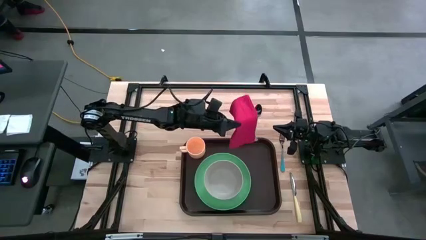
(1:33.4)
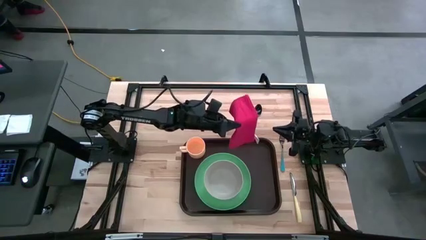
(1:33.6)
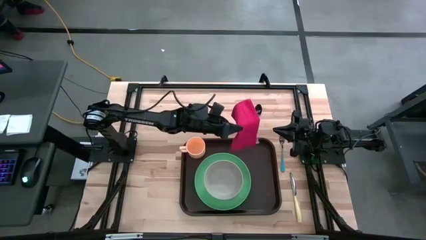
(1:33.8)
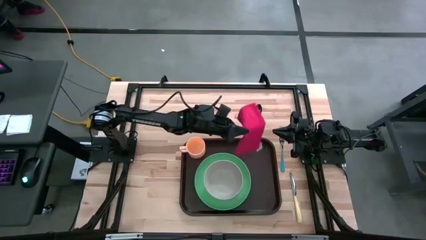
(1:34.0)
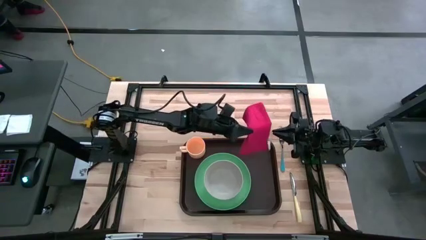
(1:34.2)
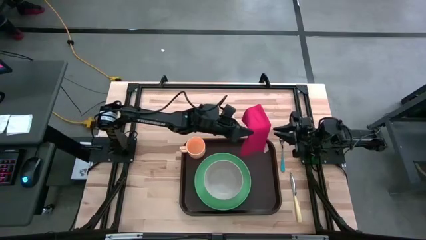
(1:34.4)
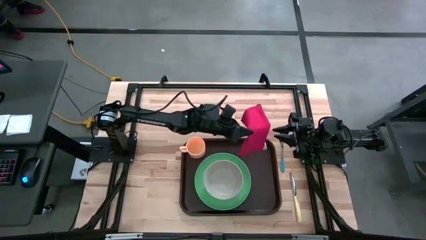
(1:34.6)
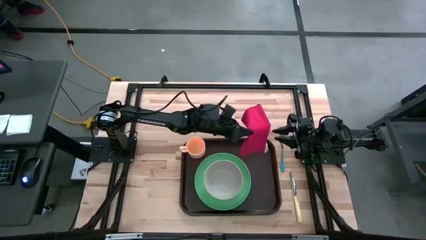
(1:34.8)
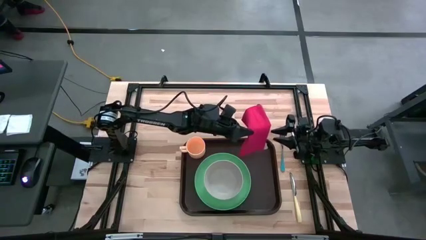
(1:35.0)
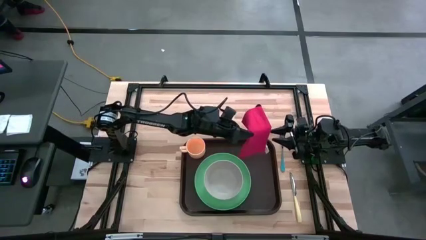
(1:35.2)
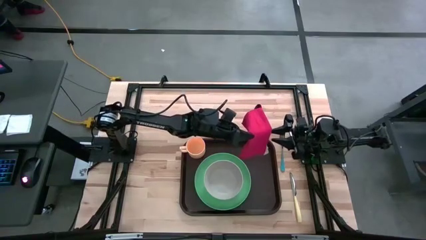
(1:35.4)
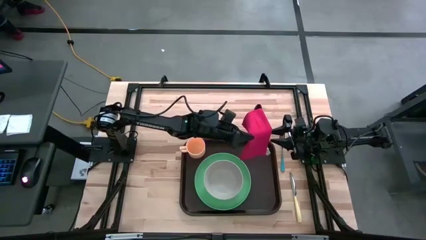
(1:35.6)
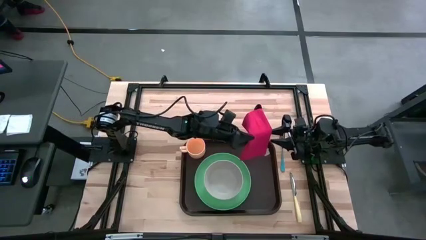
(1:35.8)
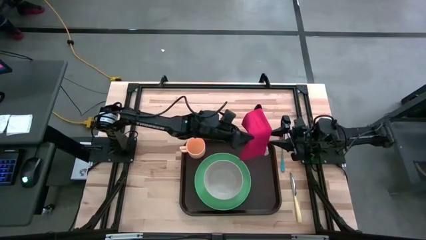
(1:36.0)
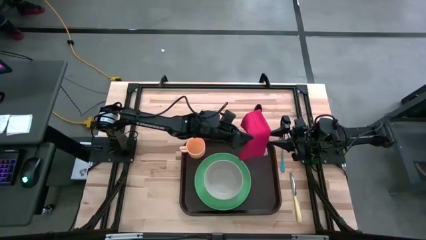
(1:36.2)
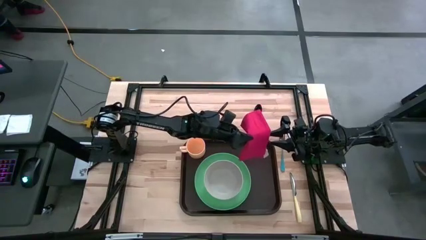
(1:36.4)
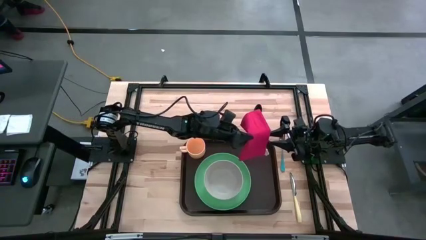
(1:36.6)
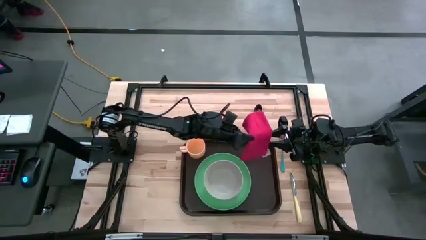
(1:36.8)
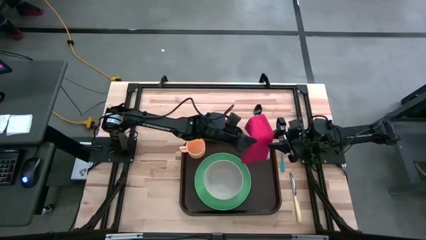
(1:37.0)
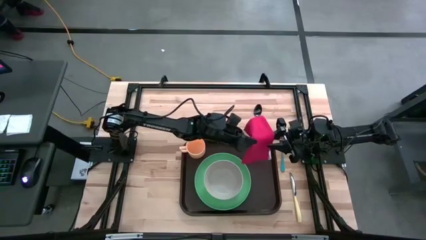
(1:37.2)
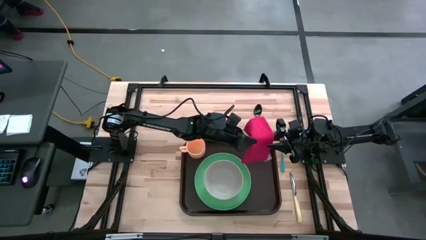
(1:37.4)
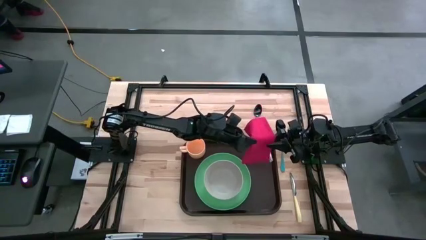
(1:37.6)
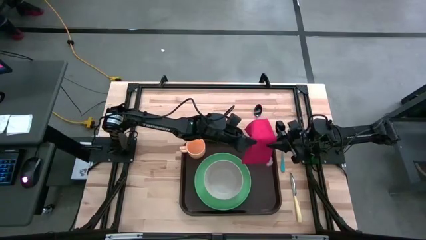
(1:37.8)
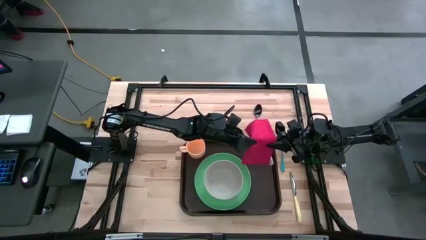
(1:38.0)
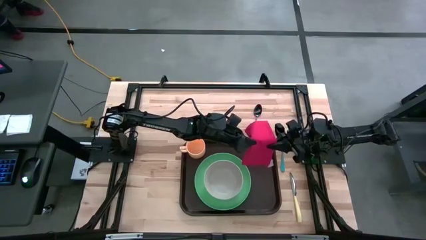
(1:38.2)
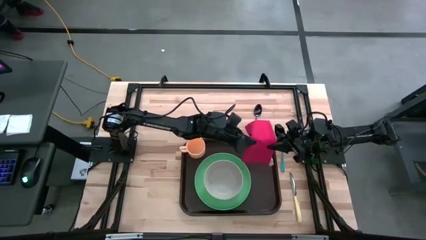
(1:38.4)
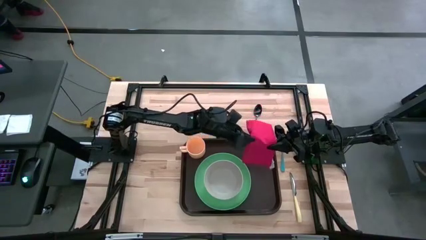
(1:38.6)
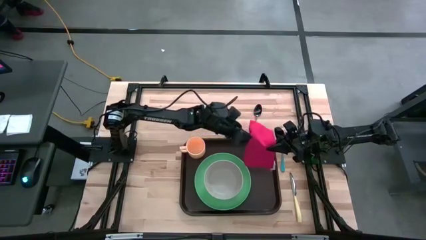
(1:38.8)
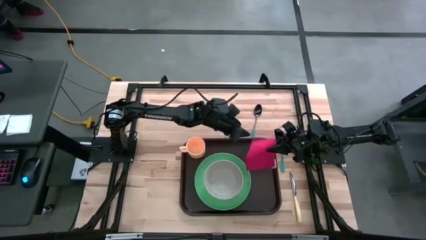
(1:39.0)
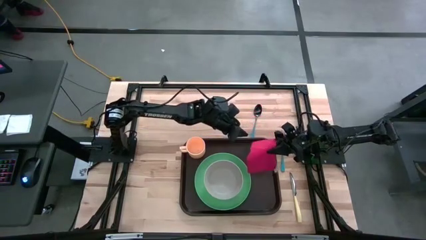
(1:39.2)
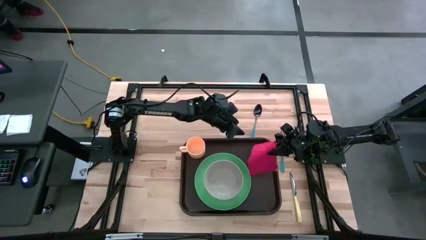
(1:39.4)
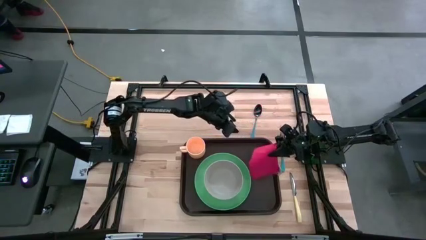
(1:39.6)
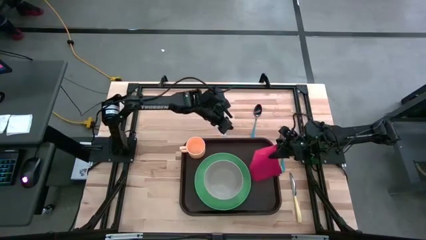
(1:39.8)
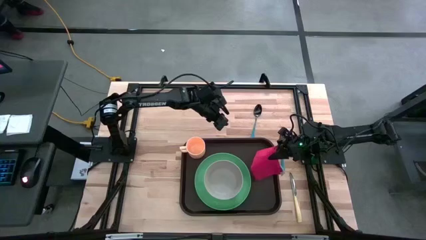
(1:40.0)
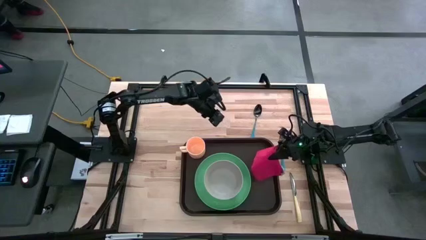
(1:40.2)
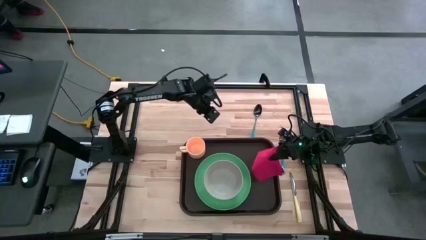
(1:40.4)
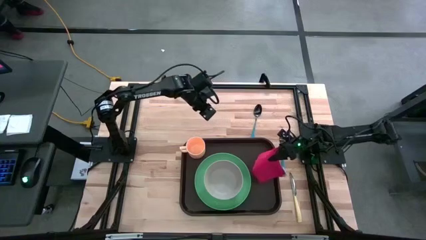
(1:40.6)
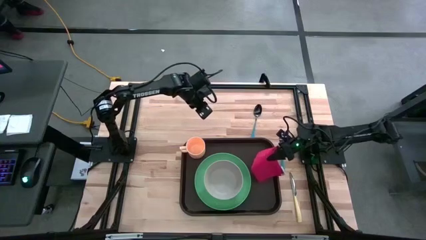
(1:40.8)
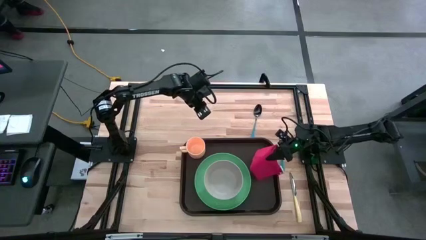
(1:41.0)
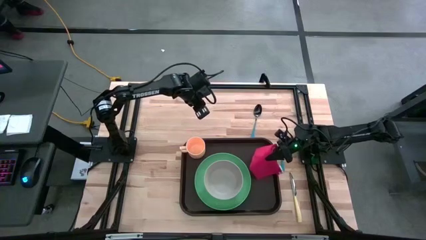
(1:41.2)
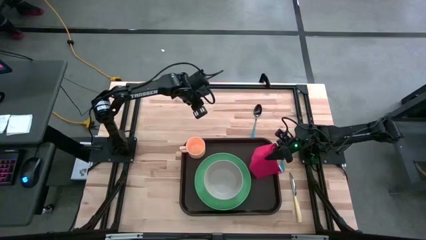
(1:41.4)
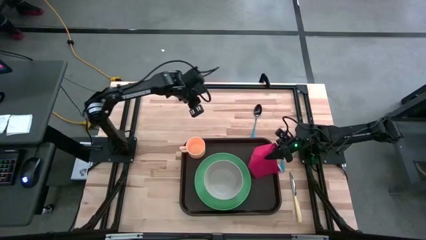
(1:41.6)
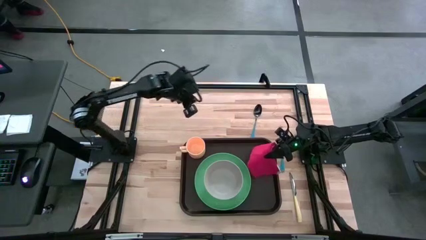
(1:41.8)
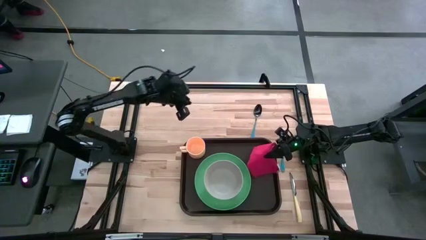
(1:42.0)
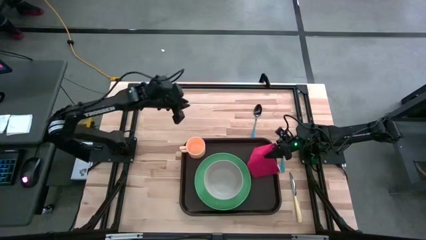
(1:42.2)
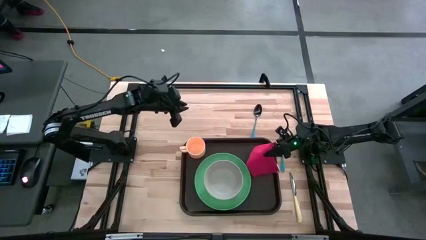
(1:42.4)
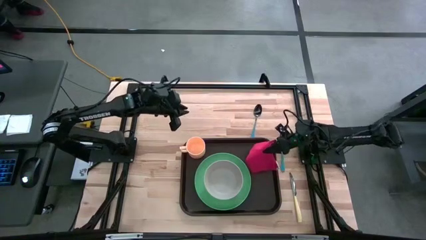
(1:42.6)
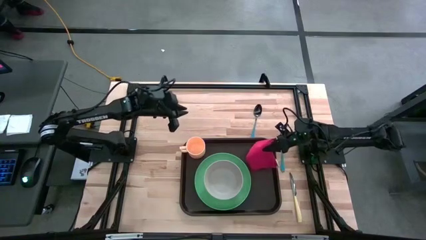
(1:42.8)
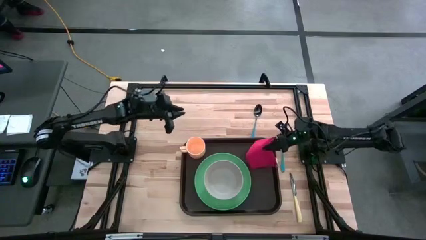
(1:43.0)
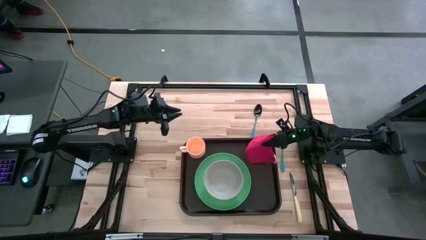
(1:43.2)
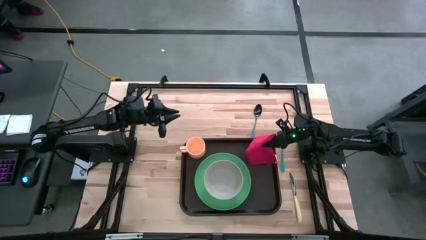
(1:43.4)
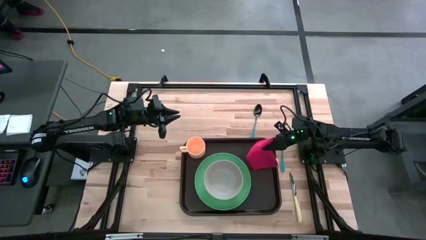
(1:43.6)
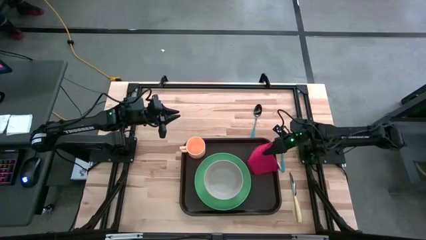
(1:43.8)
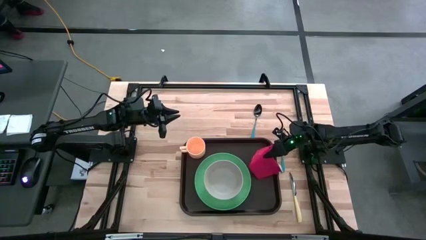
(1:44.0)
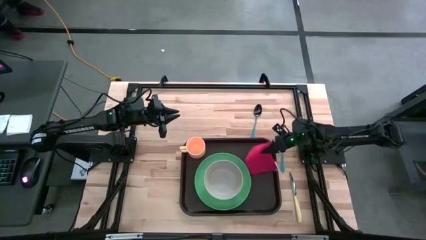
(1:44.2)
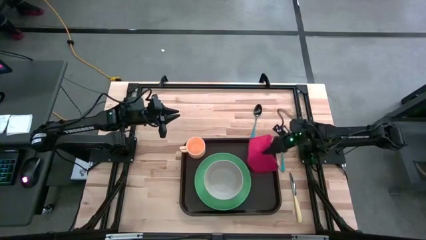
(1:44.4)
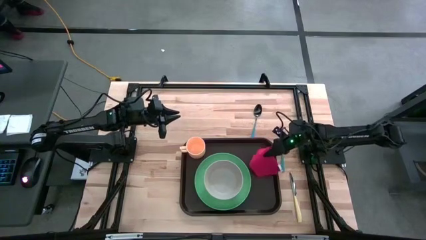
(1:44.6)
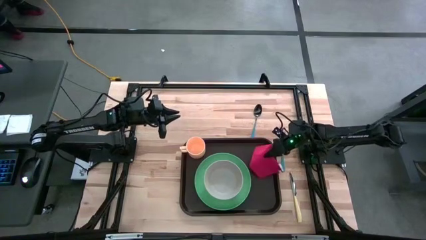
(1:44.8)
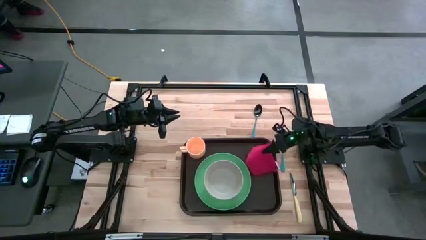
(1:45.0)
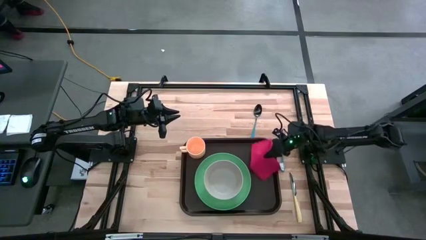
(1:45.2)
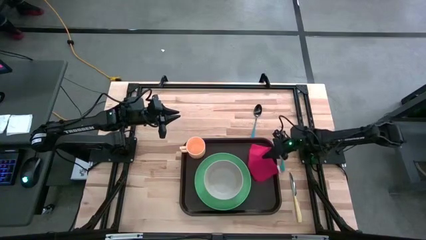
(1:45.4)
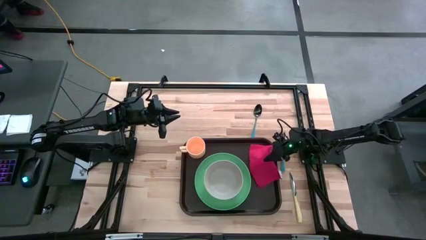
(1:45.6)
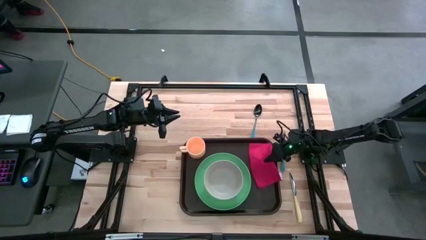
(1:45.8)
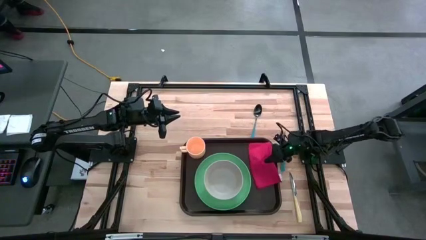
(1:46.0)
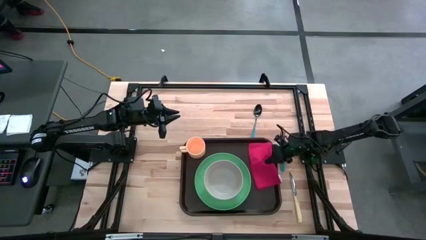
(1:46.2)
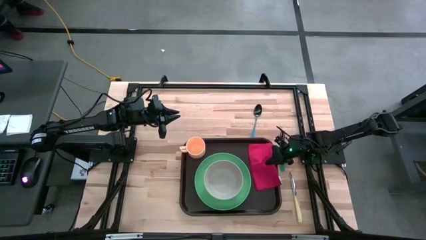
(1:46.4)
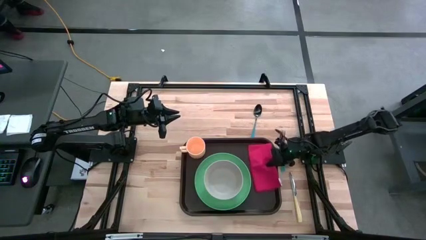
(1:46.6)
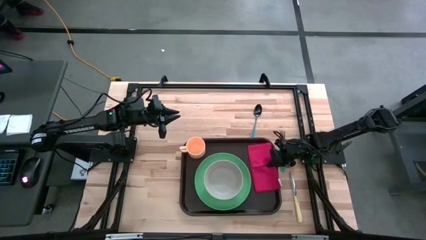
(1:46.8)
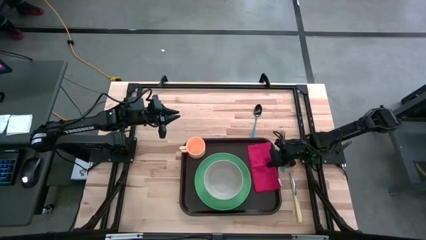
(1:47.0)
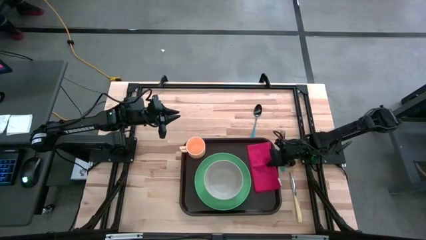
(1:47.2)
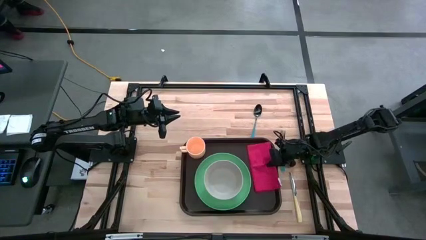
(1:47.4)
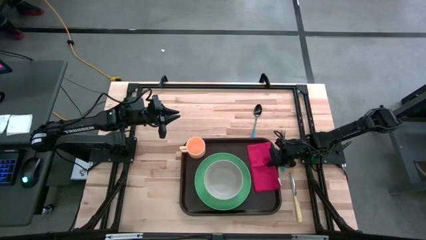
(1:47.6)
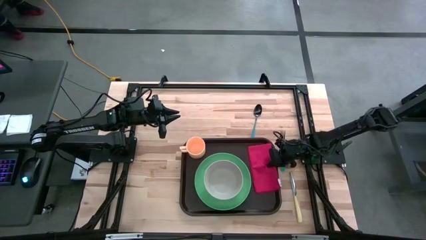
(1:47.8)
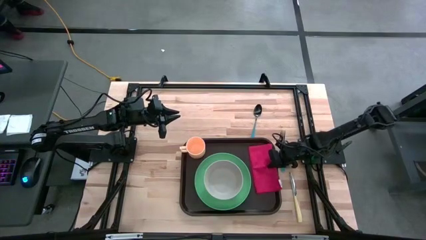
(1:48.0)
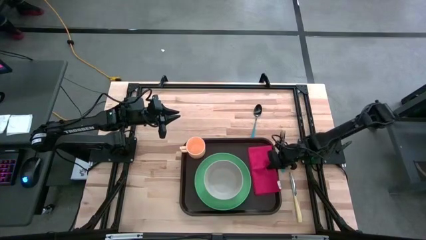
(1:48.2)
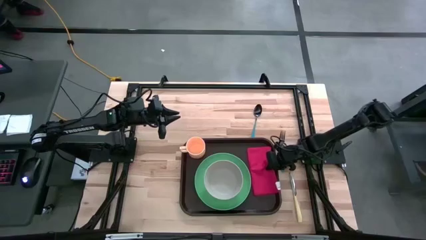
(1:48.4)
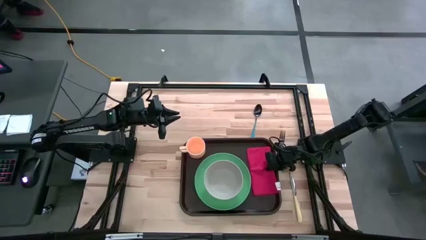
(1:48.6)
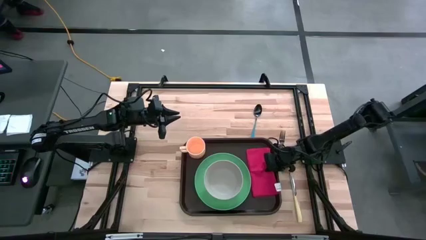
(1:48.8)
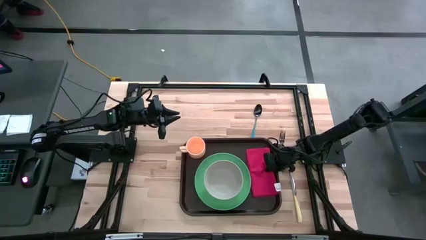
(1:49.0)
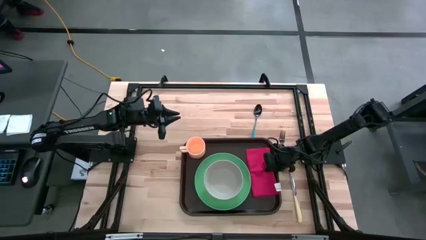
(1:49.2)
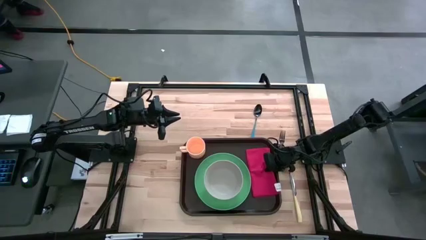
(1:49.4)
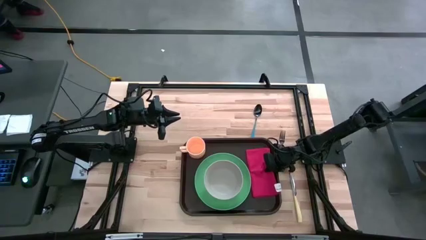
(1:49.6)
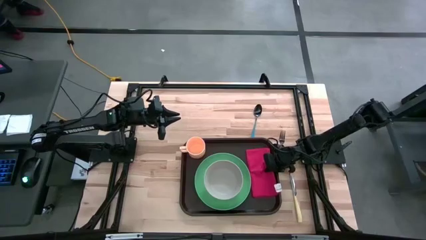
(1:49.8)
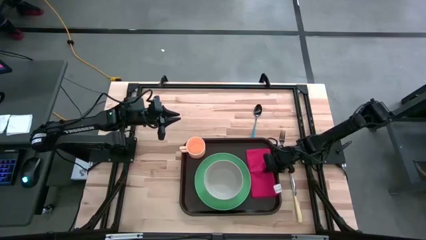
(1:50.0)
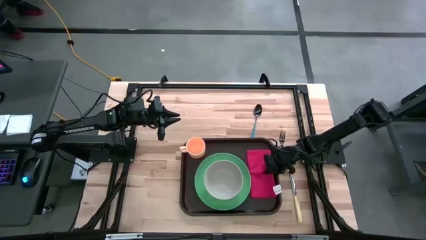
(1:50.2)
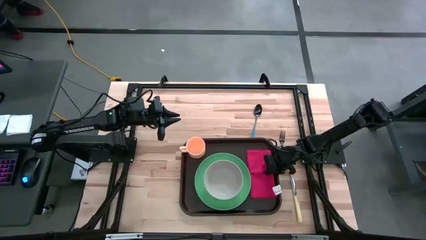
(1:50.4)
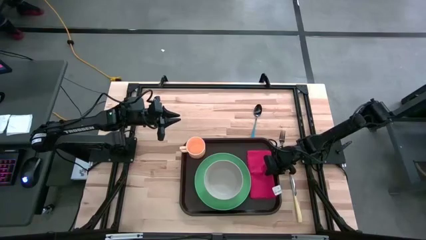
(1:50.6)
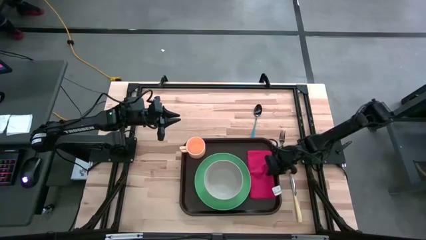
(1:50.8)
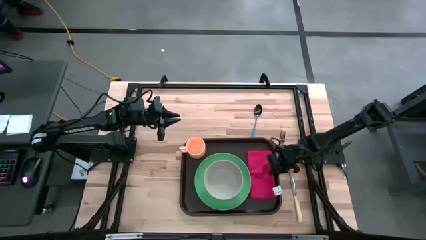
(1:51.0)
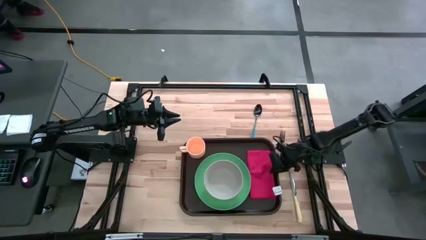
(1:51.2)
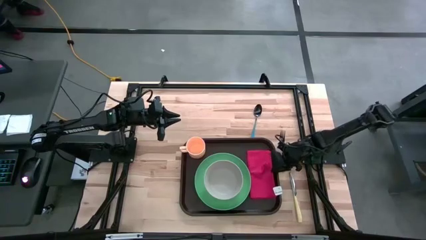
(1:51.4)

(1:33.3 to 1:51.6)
Task: Set up tray
Put the red table napkin to the right of the green plate on the brown serving tray
